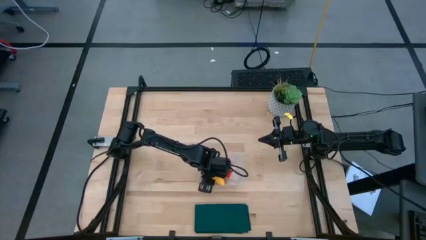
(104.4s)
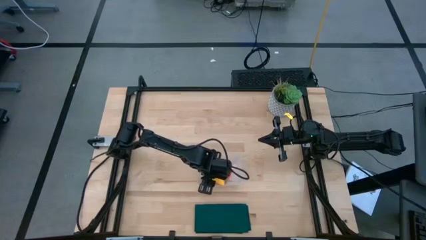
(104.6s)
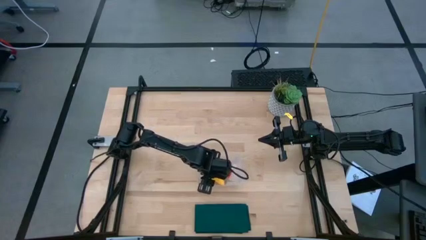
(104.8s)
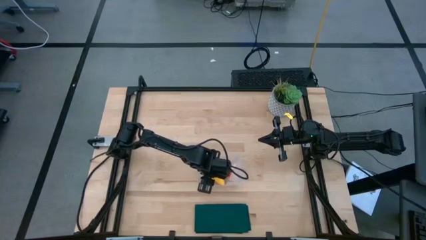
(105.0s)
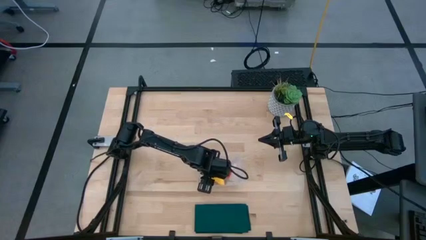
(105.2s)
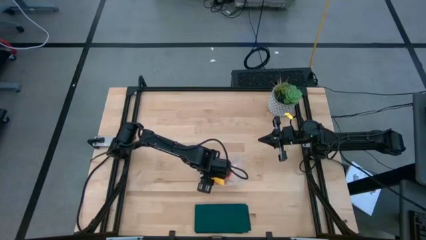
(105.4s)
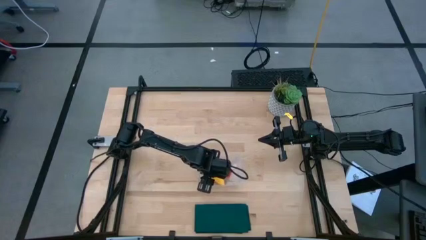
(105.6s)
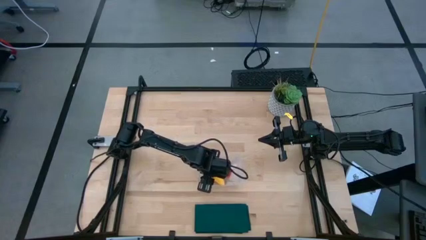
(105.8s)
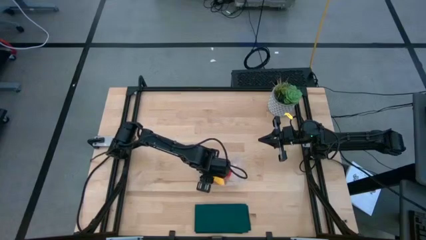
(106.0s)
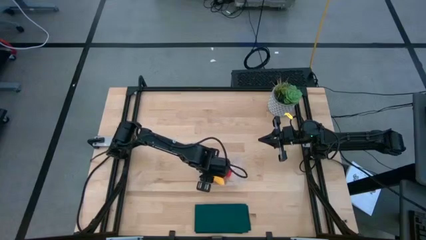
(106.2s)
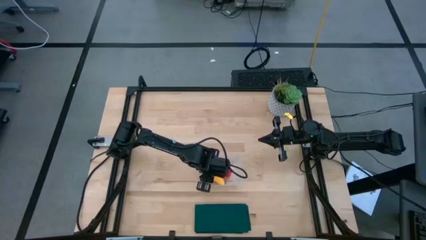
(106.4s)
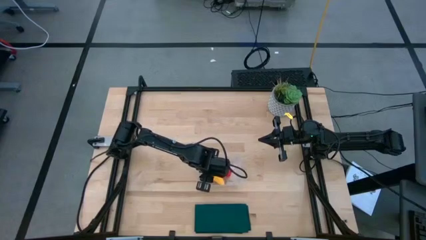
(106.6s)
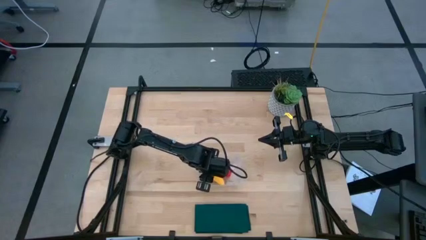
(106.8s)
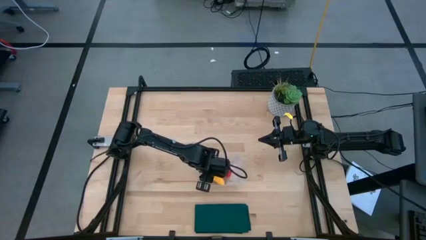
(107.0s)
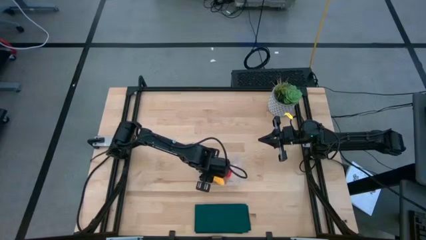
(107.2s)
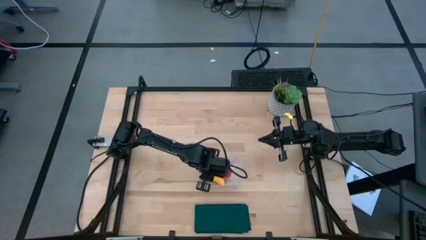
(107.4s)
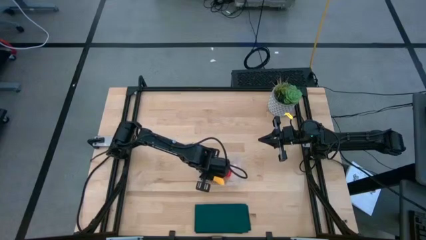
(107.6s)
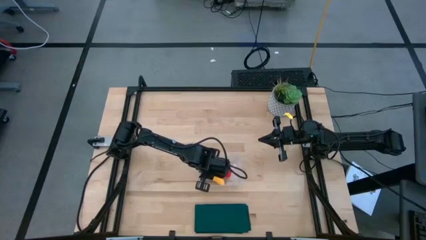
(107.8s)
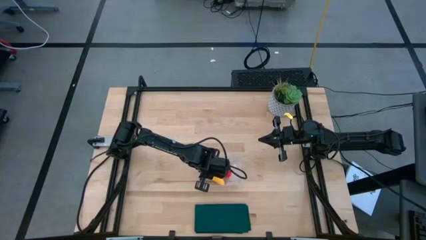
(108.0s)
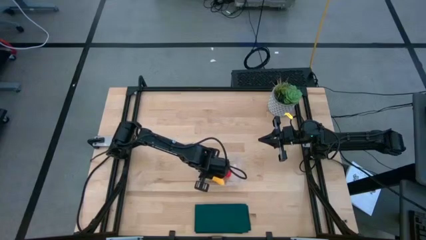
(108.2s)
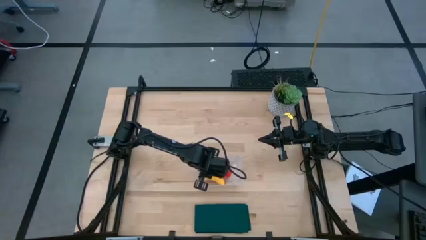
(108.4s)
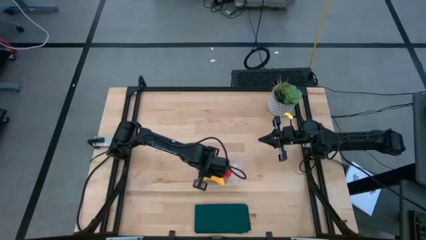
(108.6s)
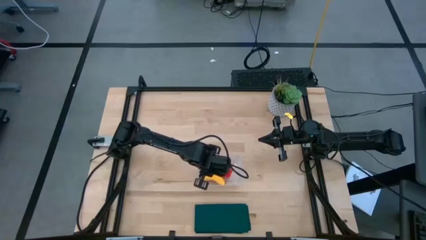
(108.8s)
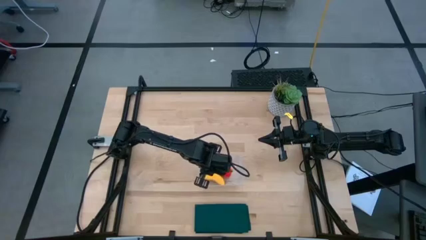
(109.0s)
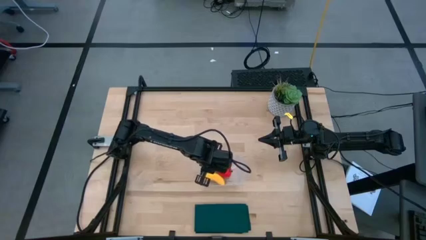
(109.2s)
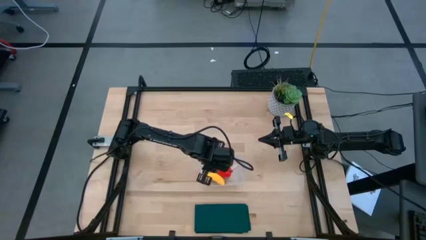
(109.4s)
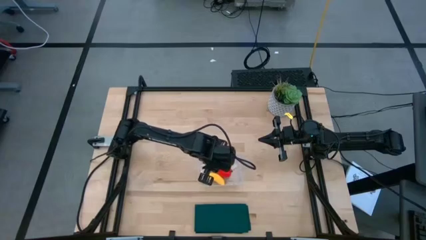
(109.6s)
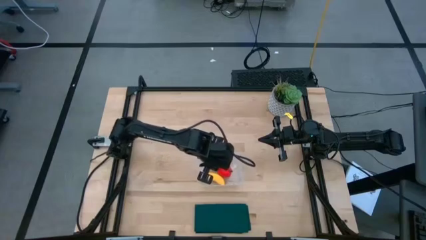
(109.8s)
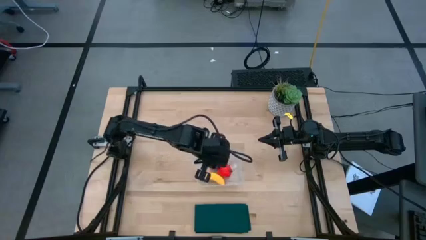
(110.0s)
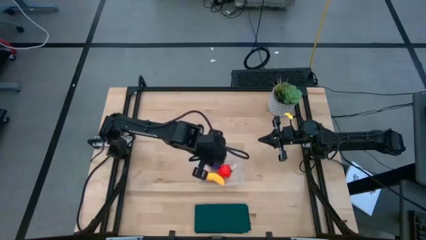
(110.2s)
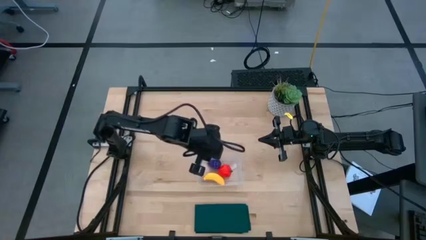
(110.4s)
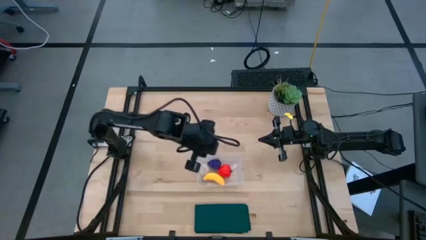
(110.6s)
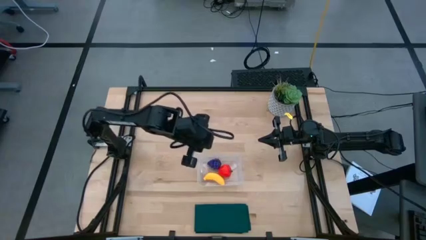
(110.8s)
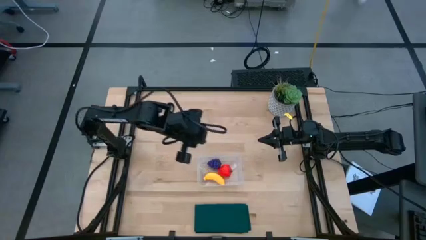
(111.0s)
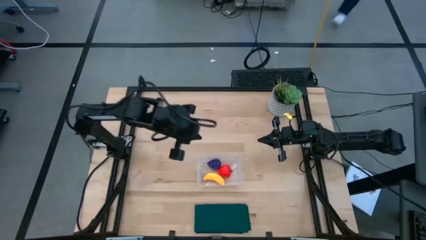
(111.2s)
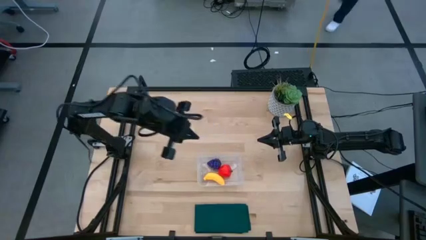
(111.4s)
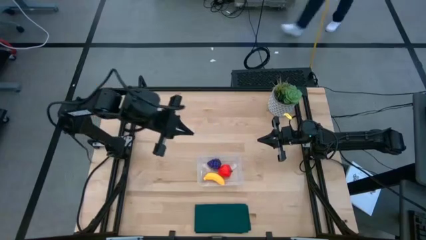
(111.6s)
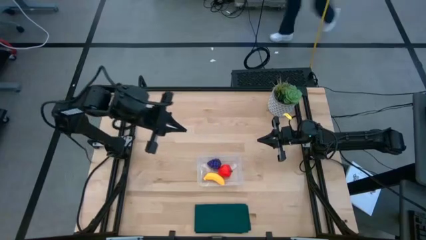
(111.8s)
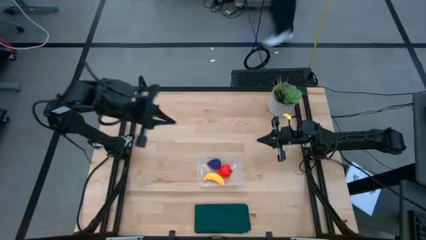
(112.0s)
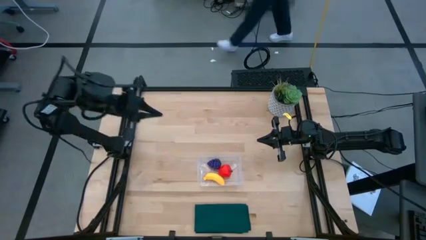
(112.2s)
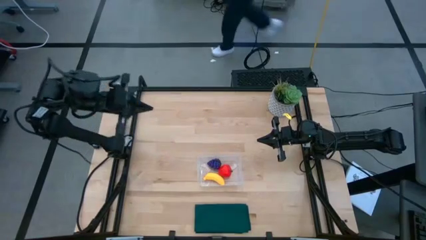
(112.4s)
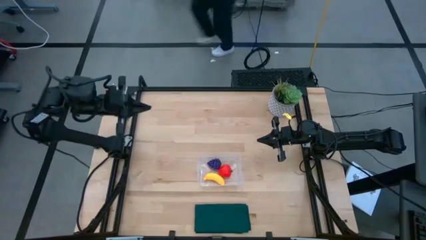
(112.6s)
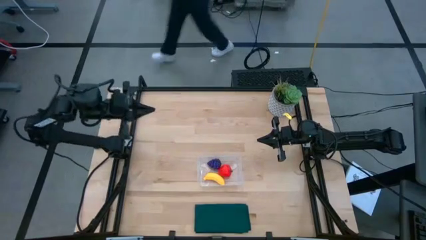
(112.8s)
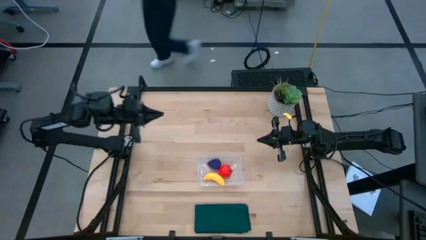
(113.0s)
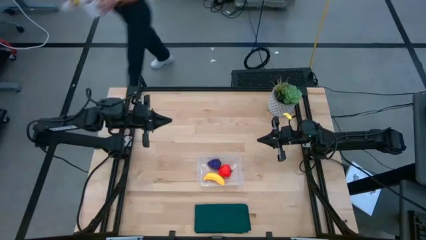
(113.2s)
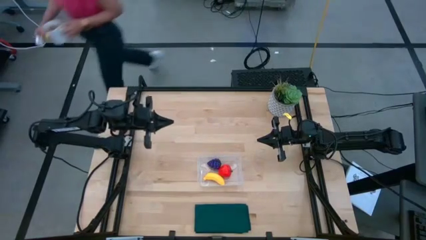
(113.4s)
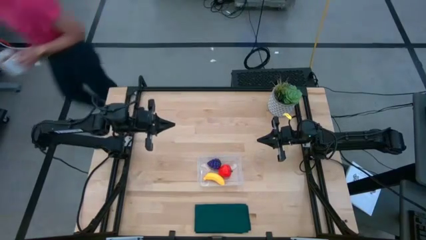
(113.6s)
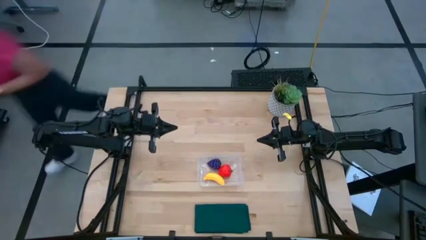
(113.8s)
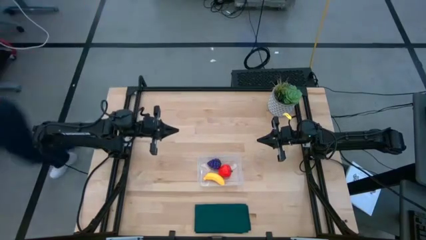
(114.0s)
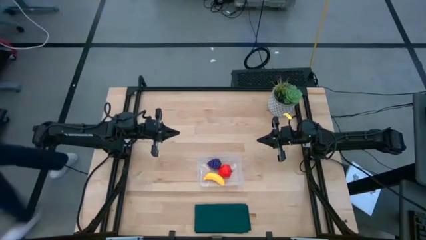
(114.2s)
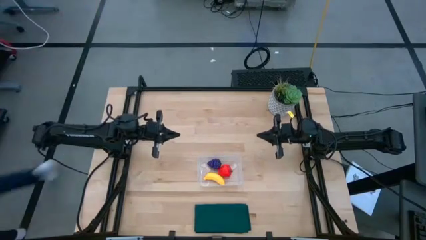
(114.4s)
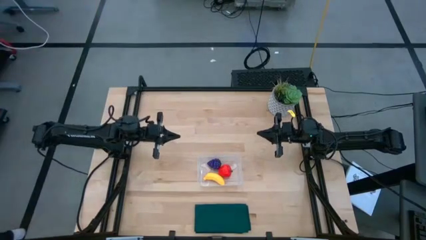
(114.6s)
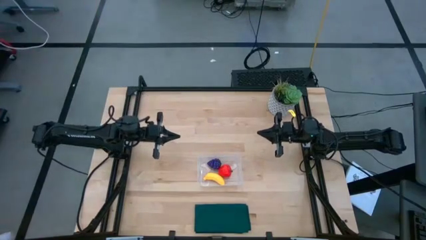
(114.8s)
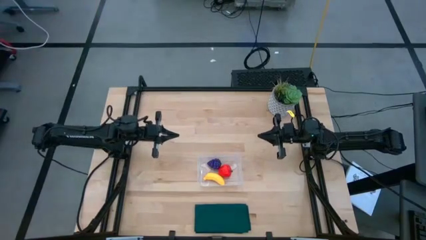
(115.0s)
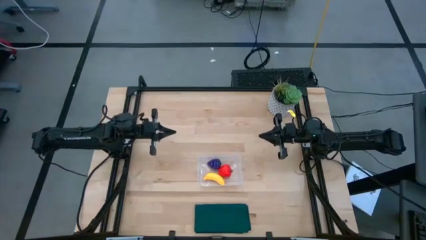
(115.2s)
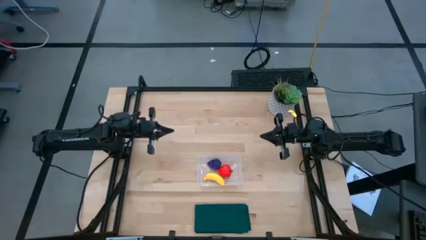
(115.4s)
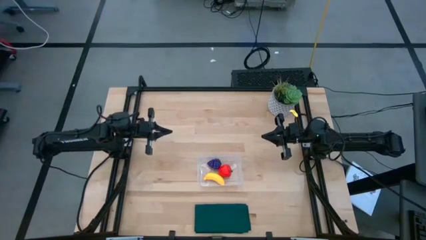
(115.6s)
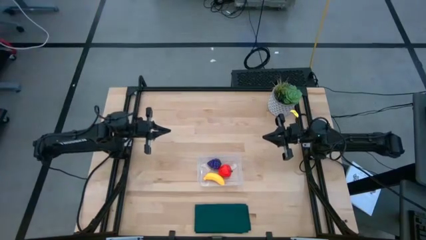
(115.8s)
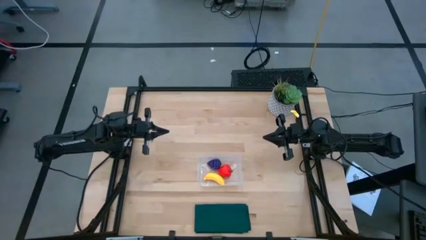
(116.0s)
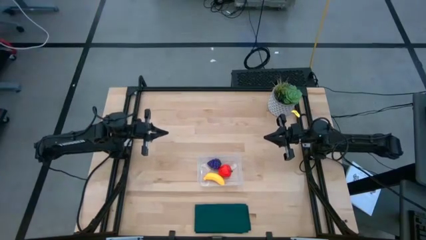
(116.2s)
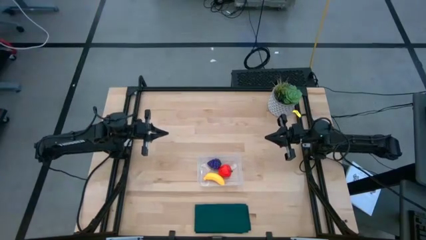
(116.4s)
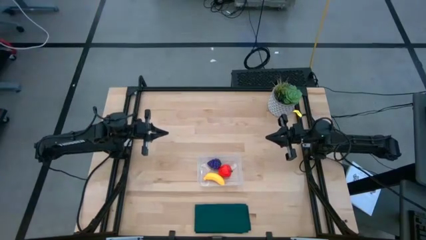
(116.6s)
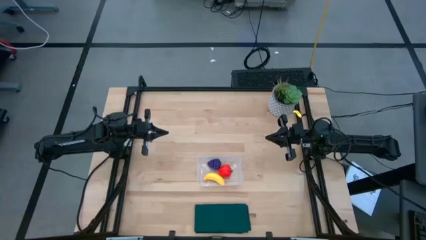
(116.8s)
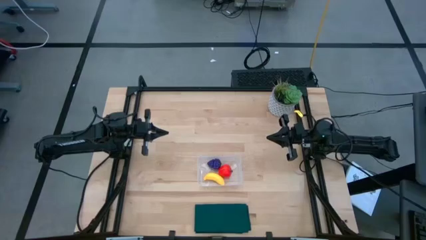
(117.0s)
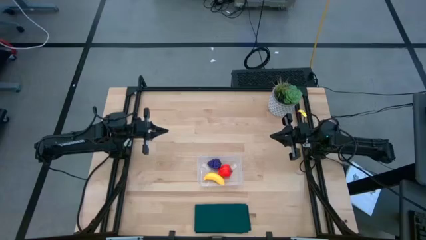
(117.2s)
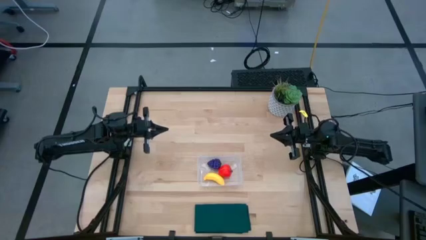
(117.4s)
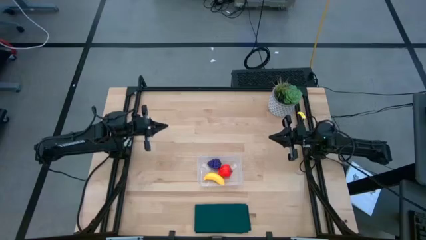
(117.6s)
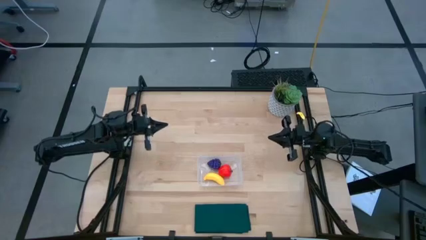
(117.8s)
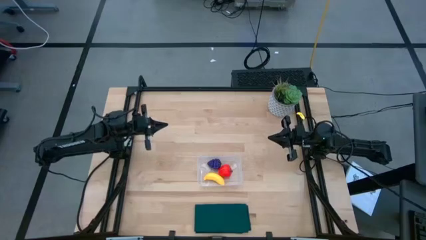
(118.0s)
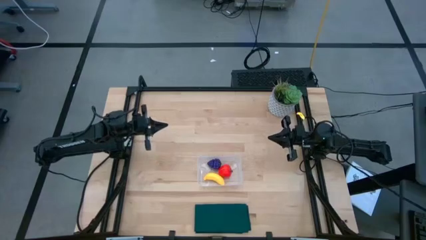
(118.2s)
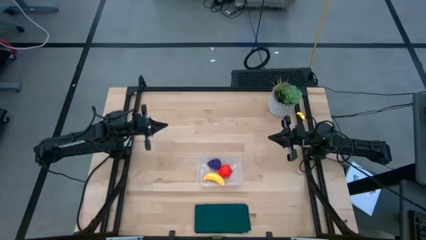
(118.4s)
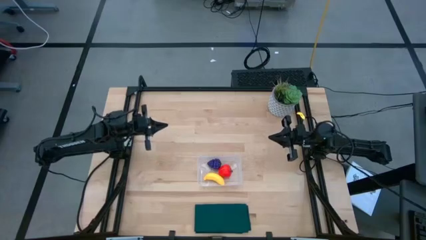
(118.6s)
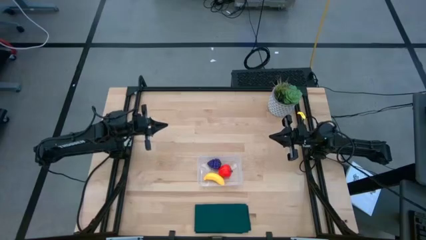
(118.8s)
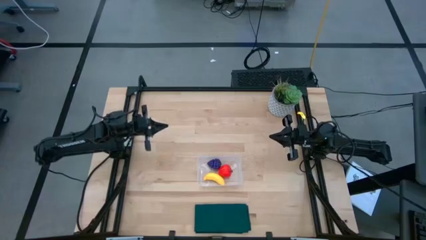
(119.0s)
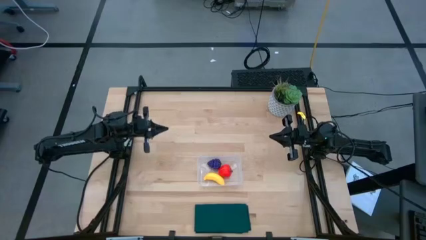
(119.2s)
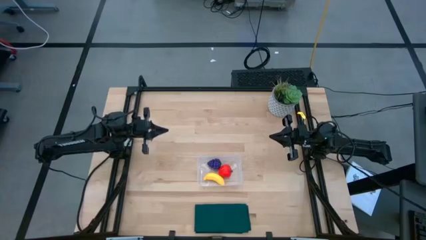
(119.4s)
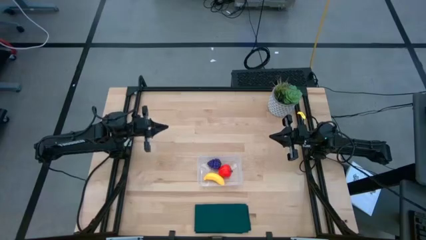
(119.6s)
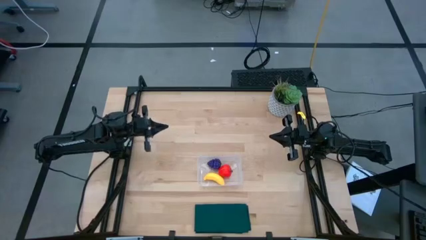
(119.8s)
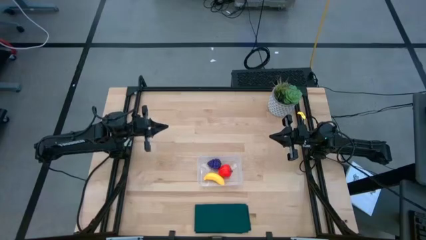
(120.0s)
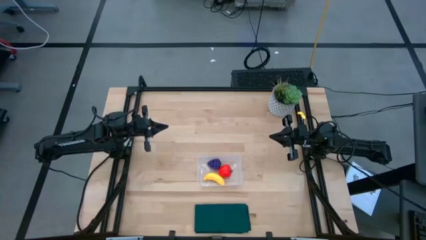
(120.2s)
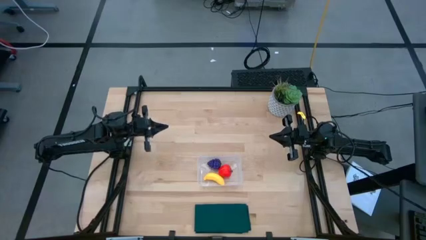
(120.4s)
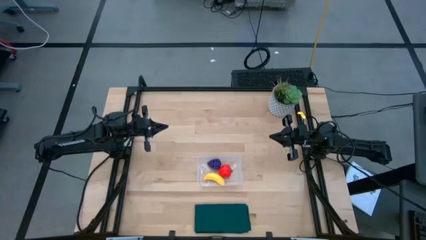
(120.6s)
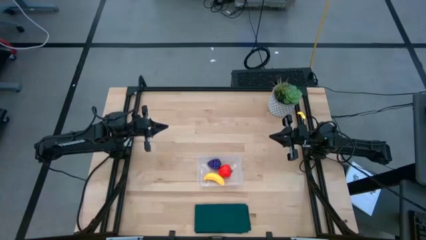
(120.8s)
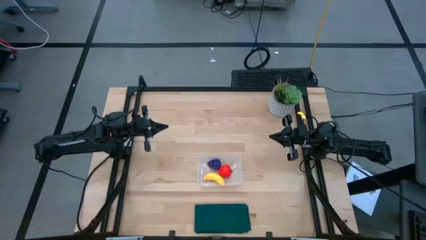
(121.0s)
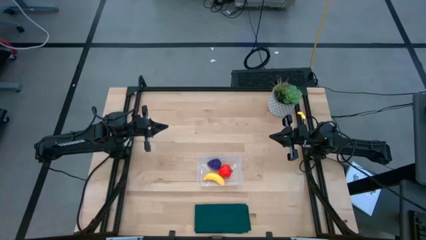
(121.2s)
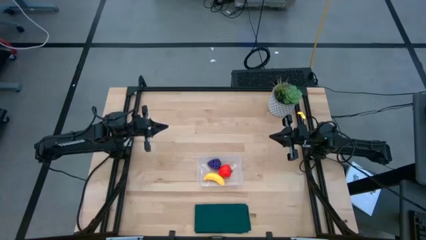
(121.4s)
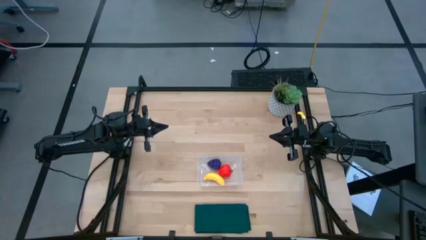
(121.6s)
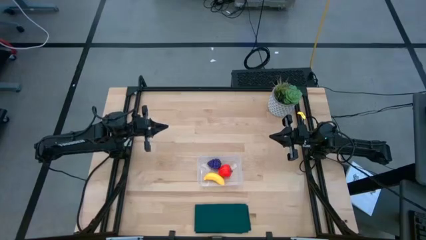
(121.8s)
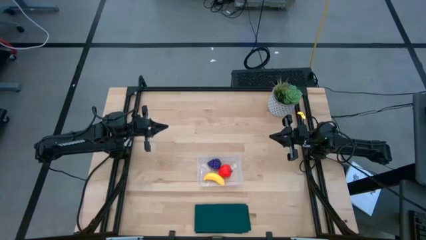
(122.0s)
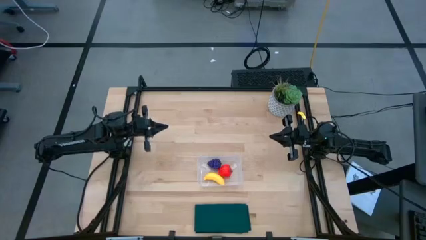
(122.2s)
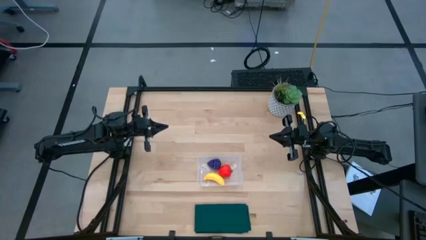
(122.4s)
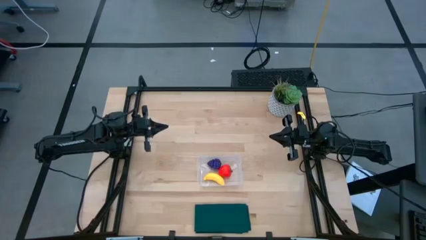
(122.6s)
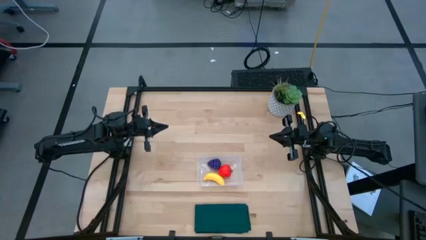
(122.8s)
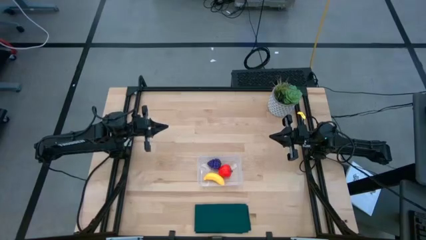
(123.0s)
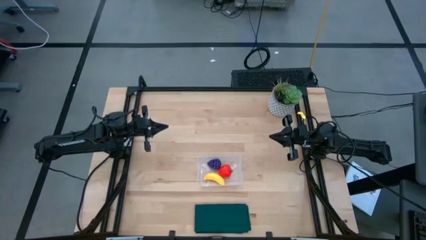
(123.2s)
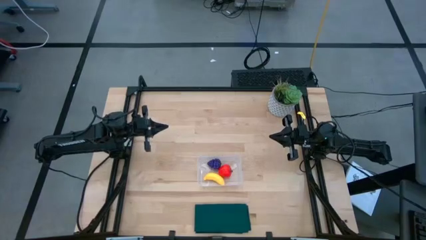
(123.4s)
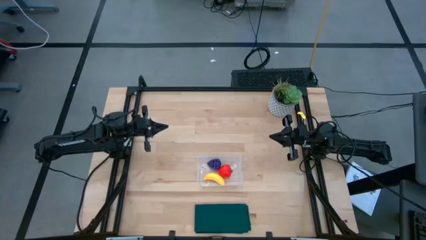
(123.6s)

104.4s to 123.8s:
Task: Pick and placing Produce into tupperware
Return to Home Position
